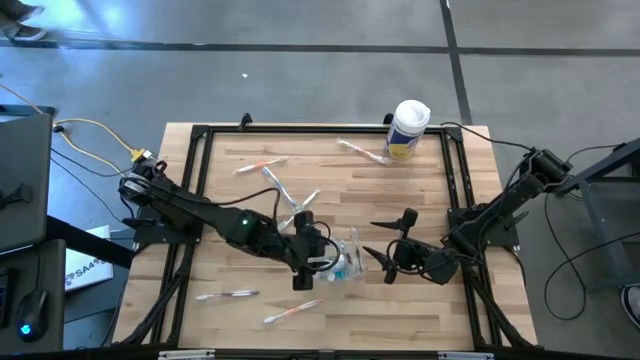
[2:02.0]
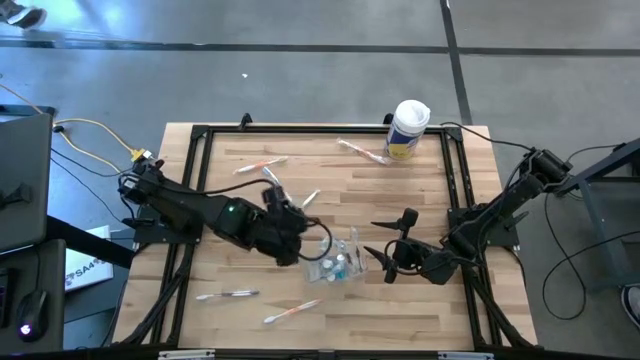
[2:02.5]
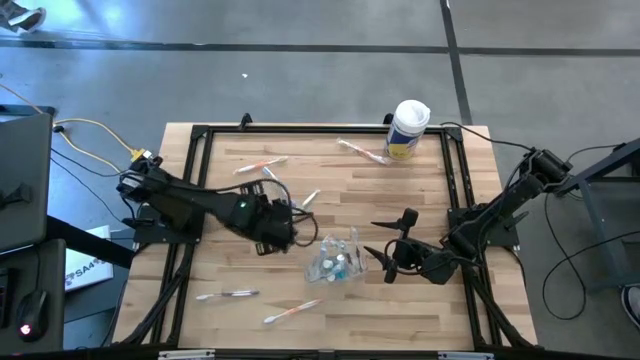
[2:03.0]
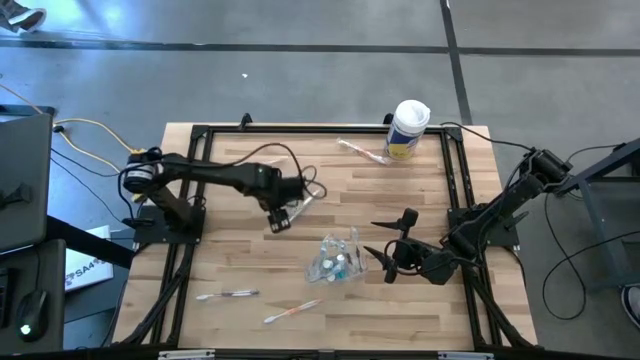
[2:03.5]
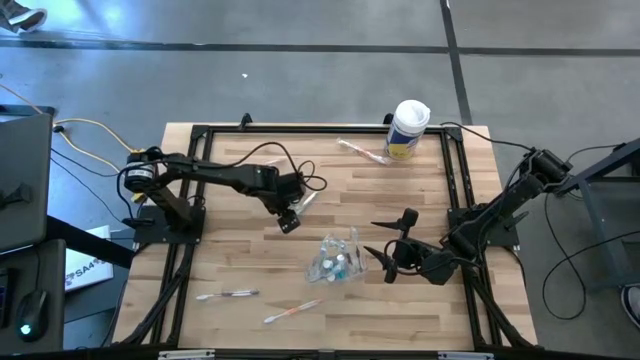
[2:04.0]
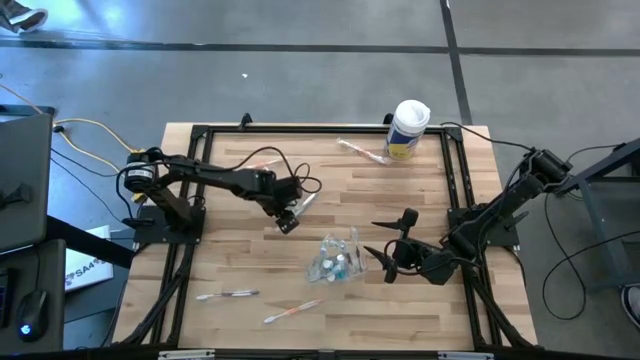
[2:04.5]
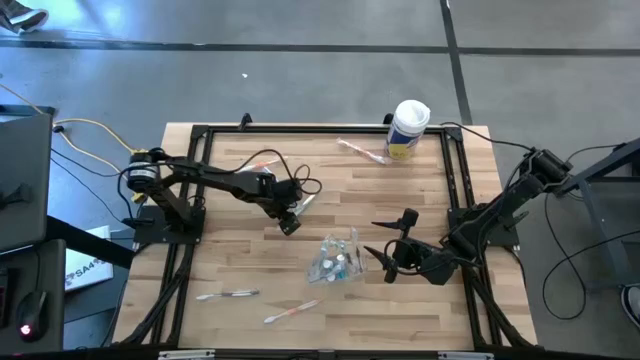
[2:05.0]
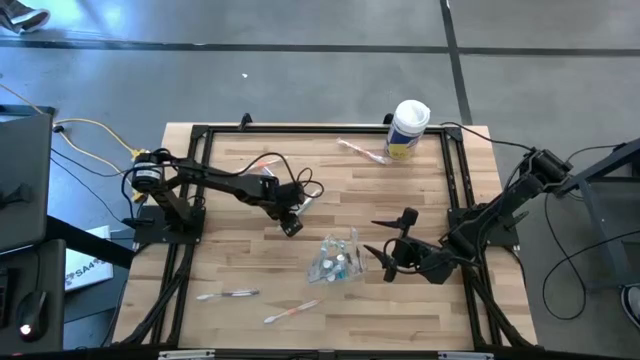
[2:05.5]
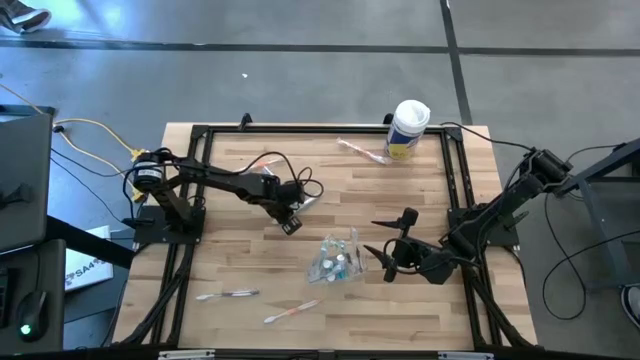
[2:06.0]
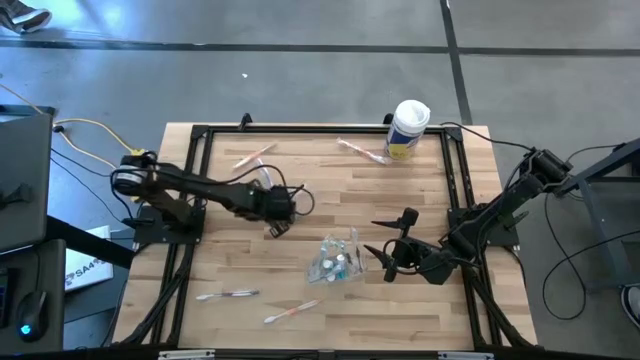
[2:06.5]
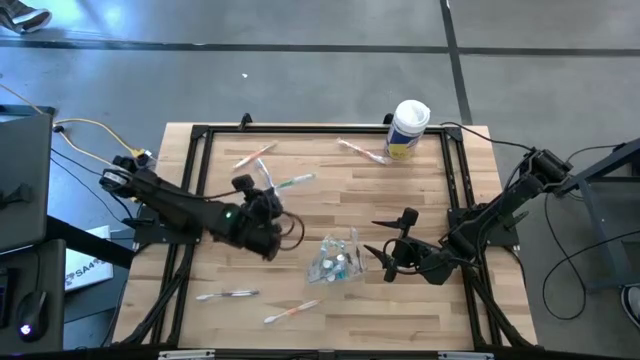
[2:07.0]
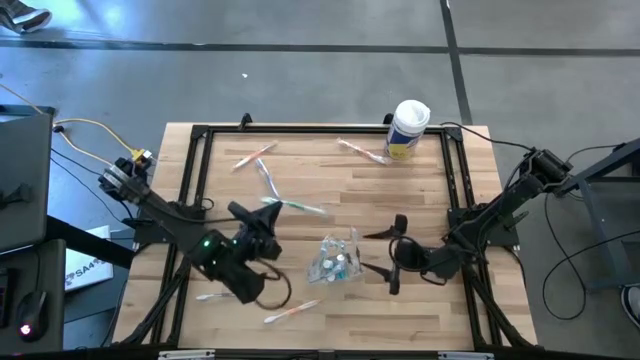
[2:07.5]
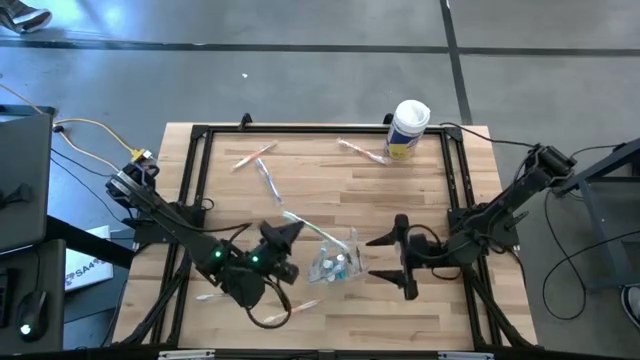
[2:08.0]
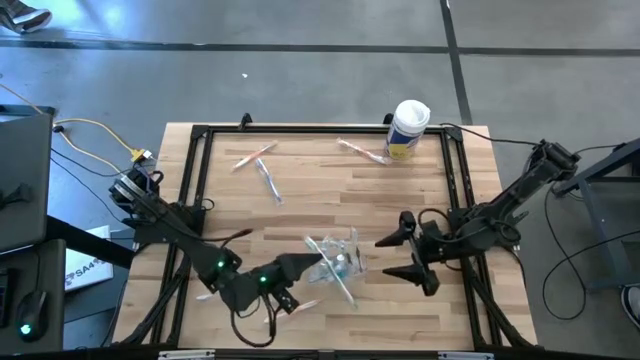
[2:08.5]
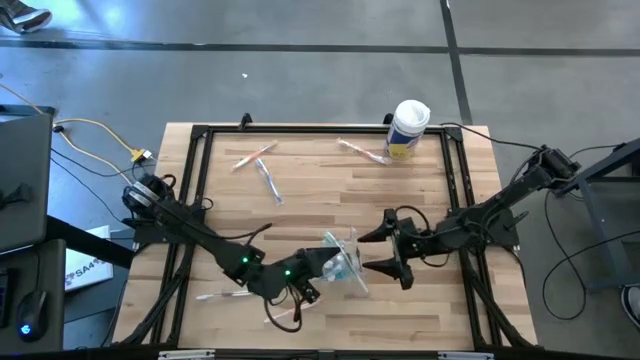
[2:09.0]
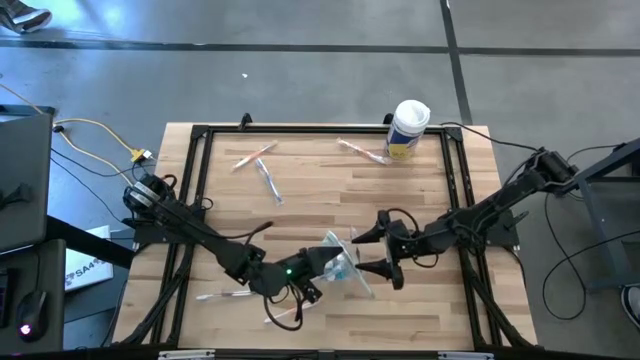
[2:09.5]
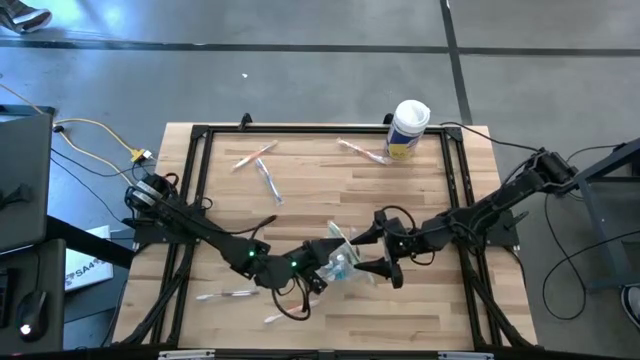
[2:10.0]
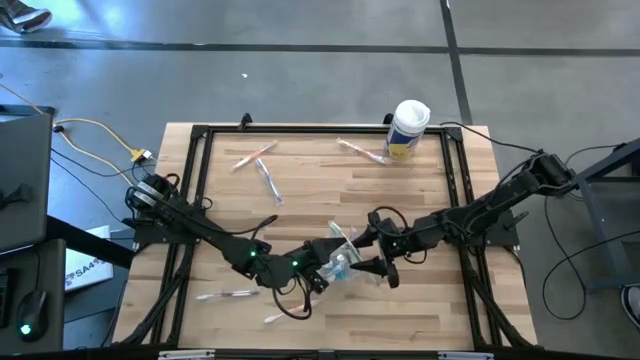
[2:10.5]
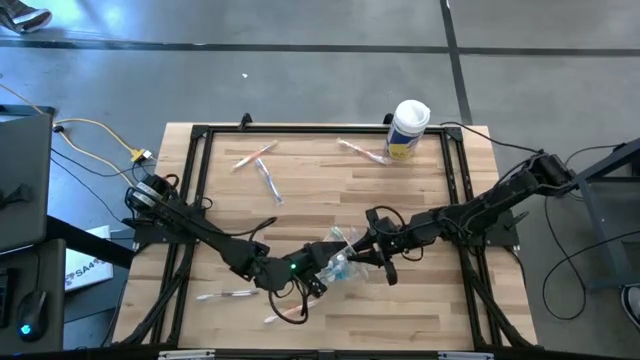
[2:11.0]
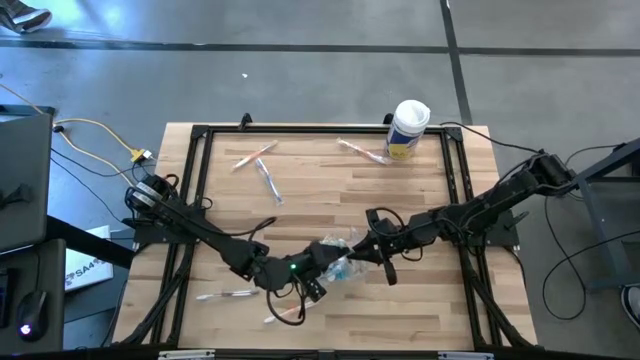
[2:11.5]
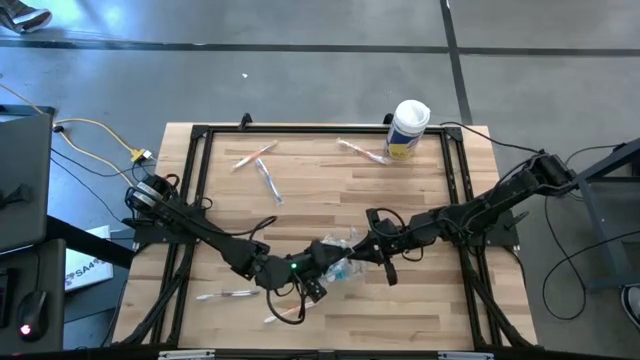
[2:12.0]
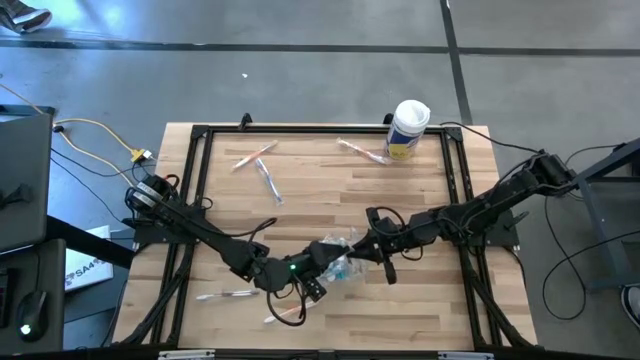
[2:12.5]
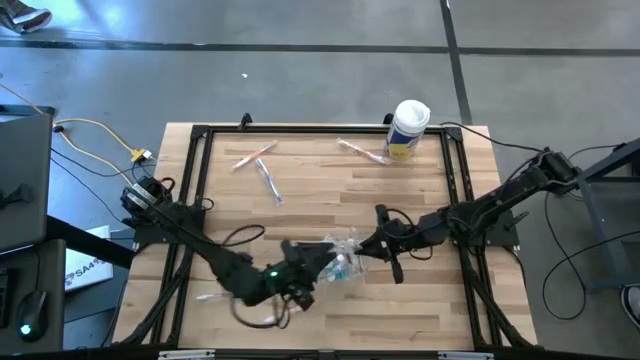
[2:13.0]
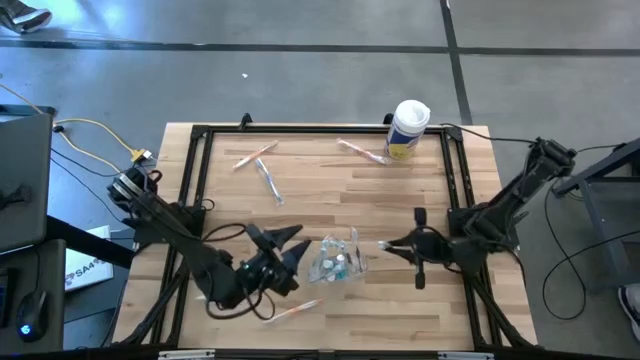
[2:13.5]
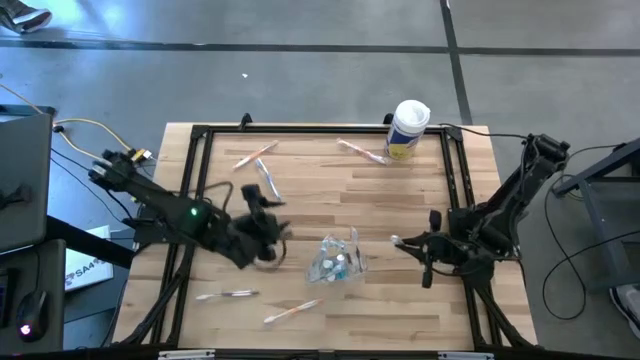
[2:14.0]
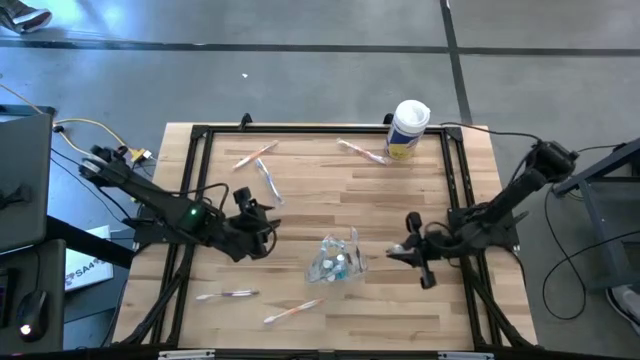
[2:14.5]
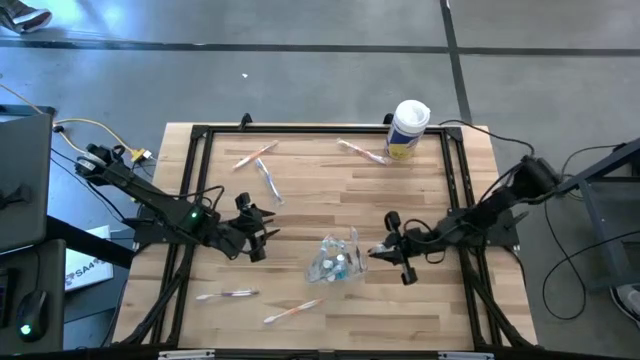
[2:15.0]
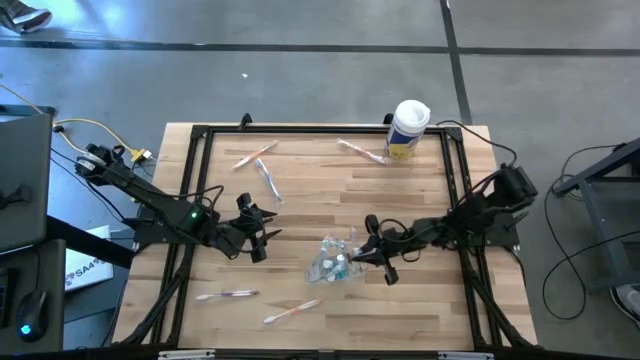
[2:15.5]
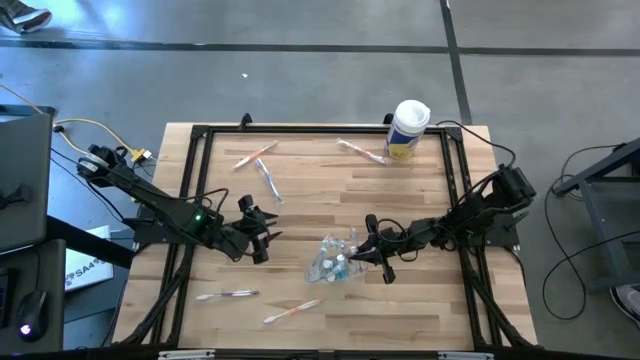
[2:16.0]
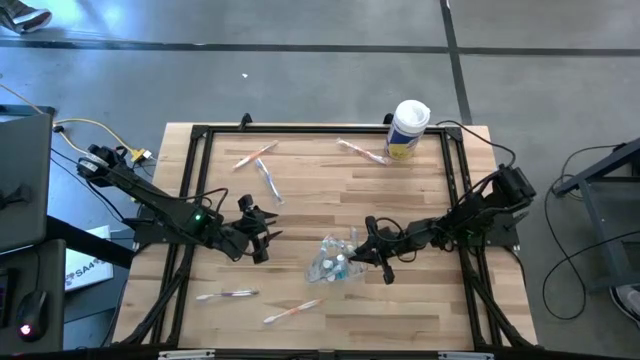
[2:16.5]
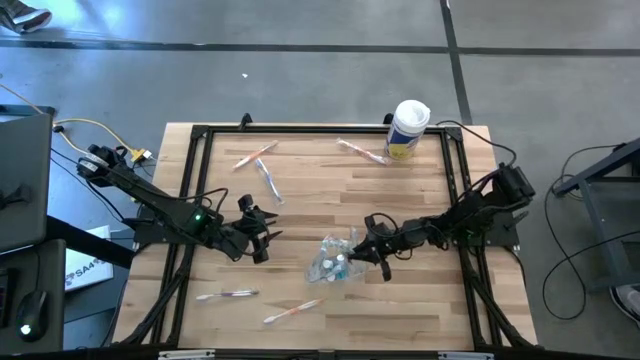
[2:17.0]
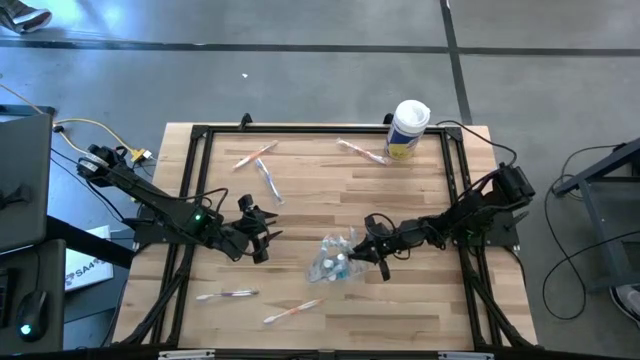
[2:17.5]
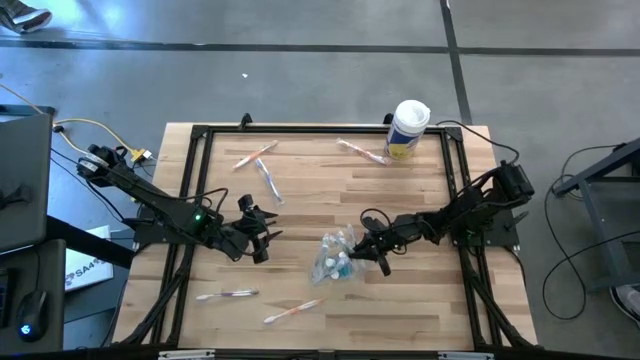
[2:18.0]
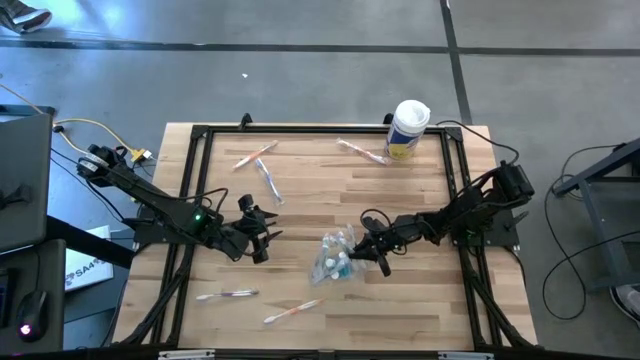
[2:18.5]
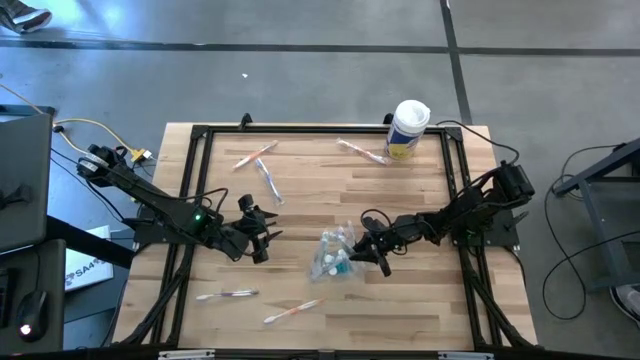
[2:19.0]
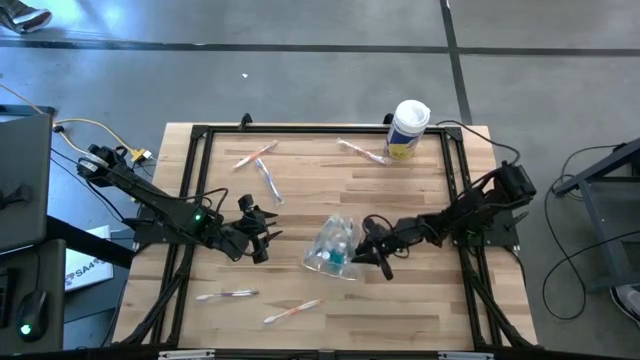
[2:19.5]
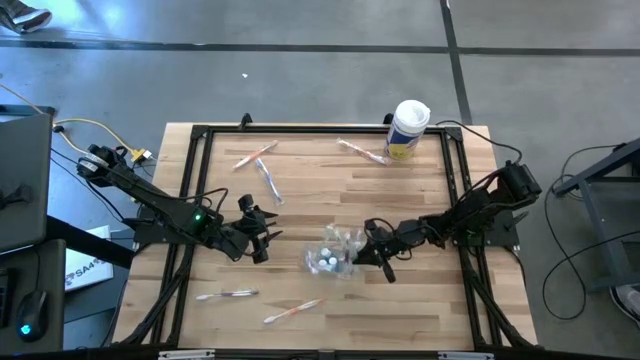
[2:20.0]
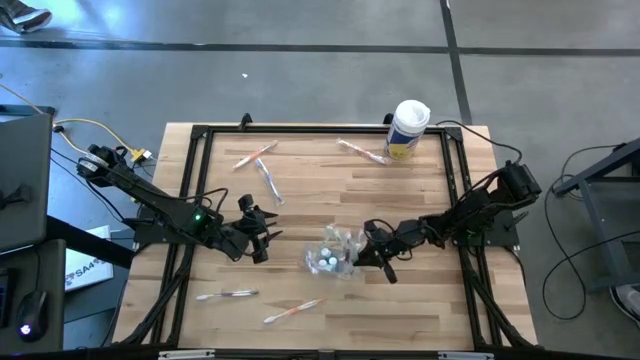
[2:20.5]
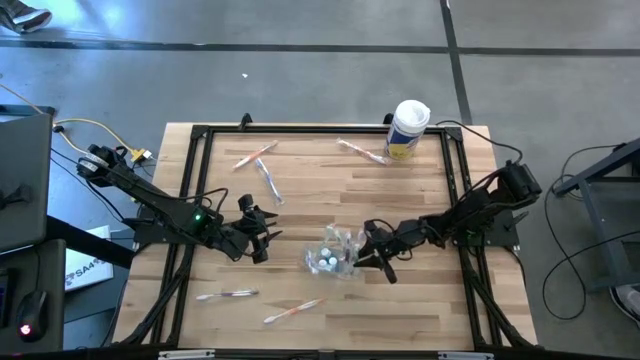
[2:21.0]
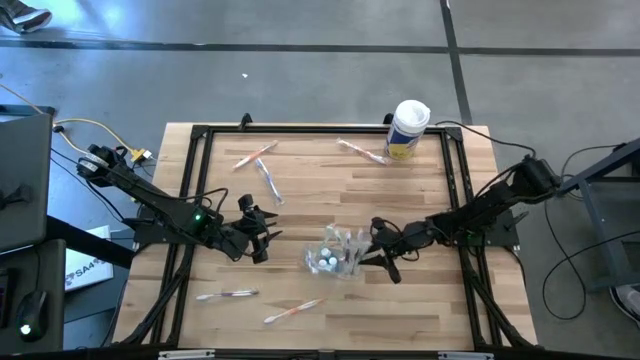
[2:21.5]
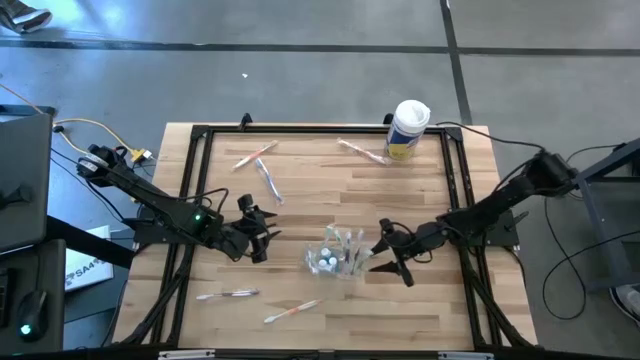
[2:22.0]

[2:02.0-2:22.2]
Task: Pick & Place toothbrushing station
Put the green toothbrush into the transparent organizer
